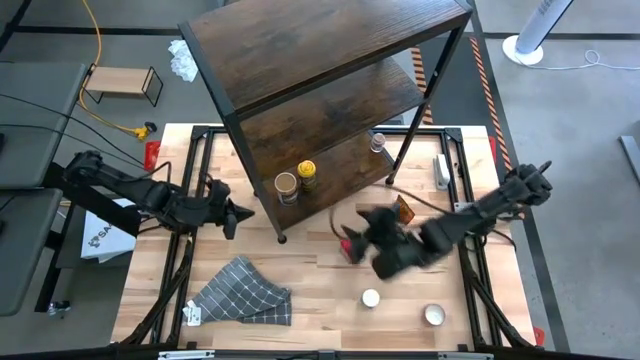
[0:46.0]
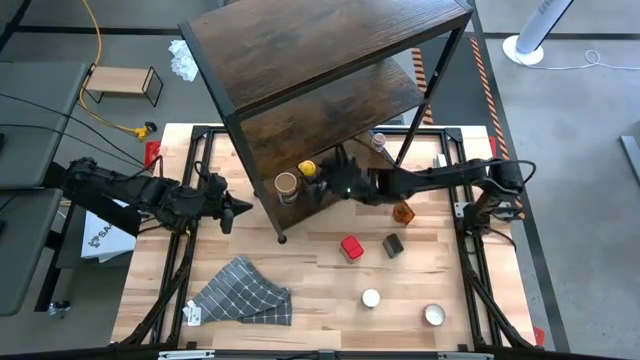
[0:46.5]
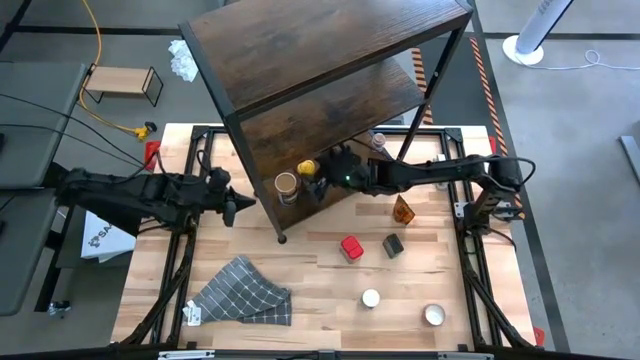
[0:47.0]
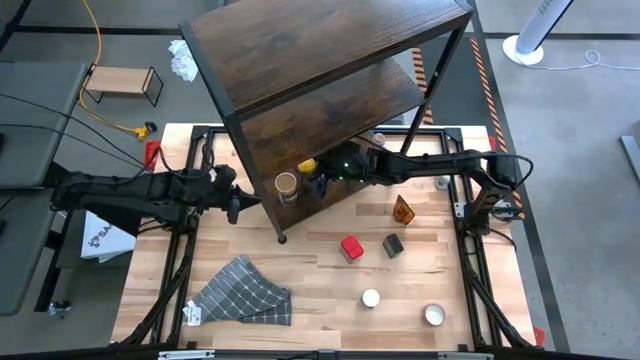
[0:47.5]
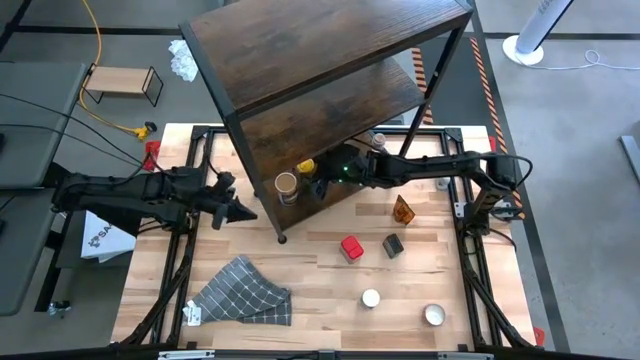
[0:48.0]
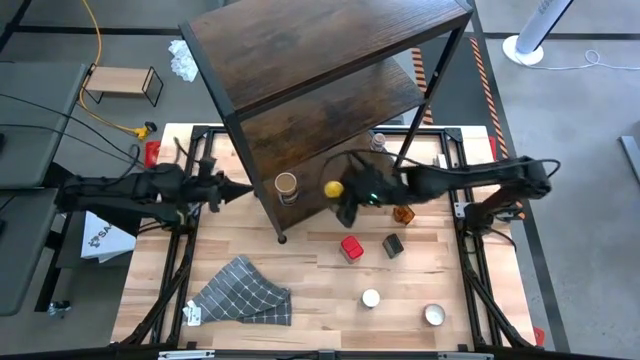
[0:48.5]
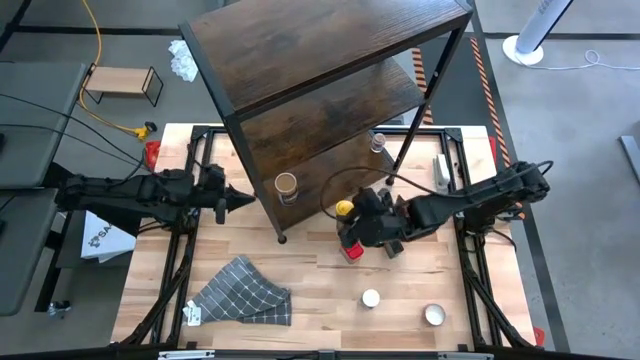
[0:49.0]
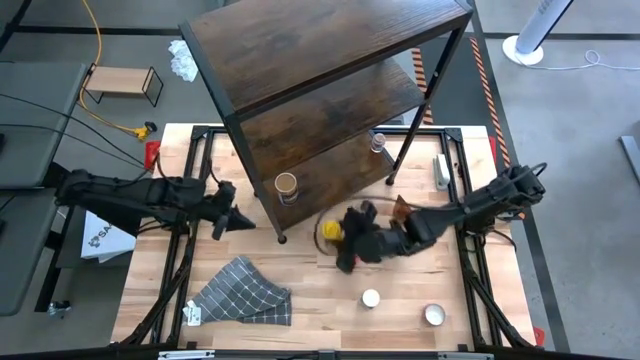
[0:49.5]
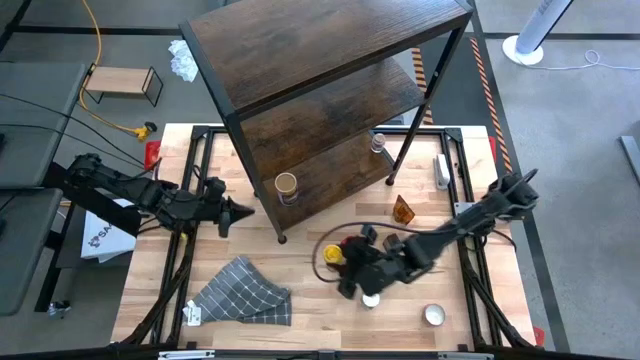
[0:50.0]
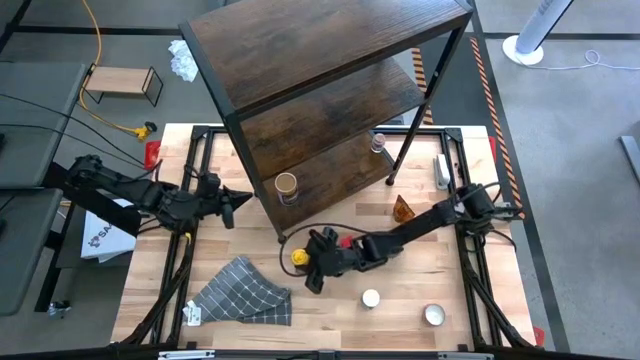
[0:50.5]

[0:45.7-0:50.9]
Task: Shelf spices
Remove the yellow seasoning bottle from the shelf

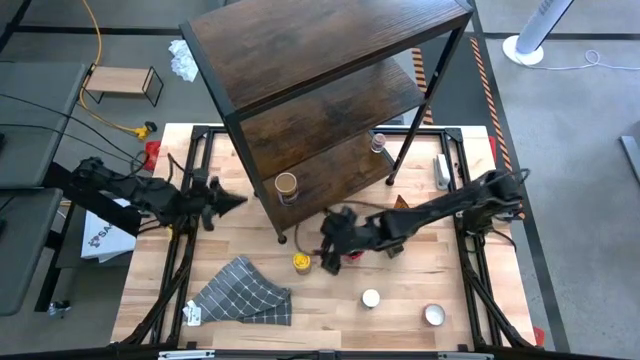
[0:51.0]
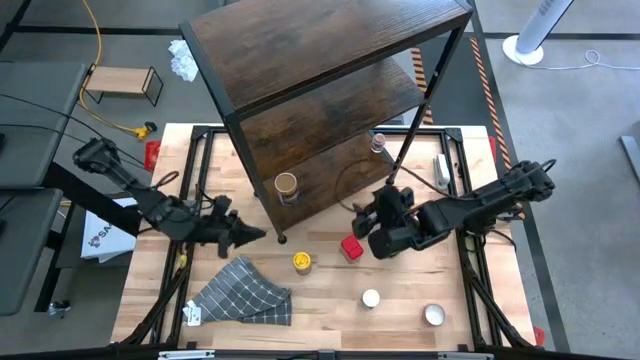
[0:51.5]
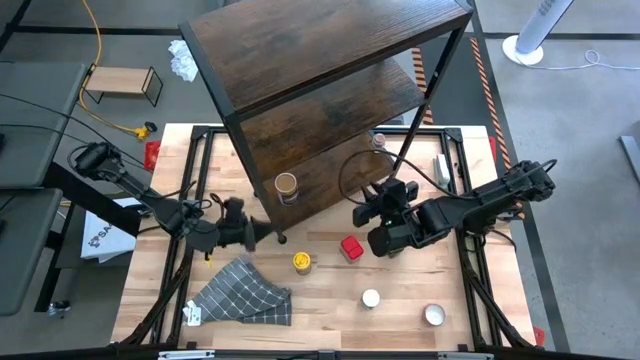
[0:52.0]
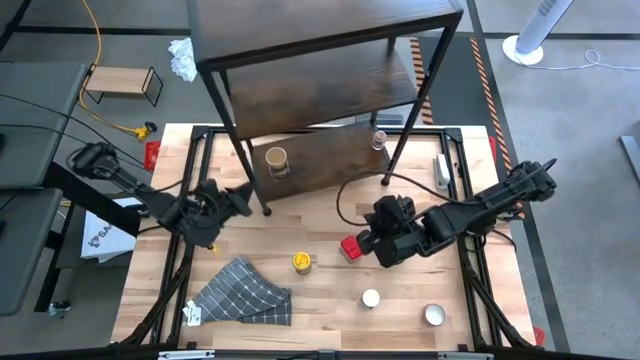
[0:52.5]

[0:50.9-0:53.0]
Adjust the shelf

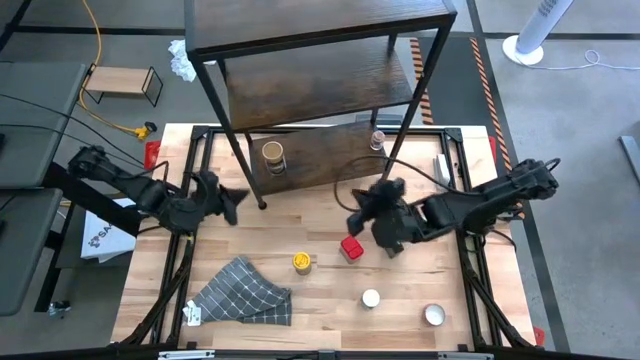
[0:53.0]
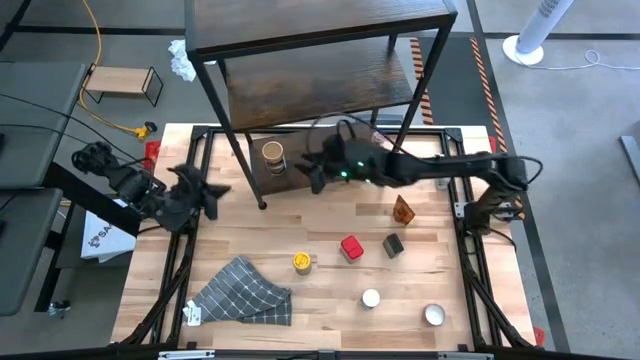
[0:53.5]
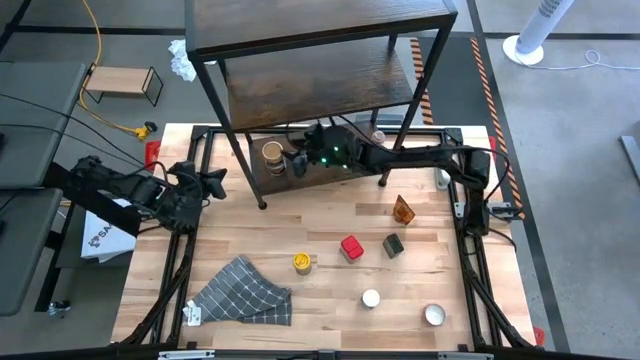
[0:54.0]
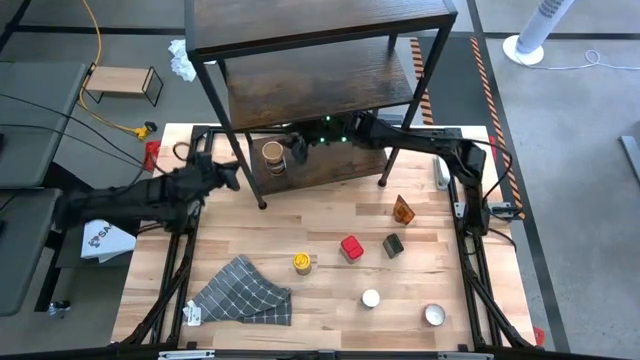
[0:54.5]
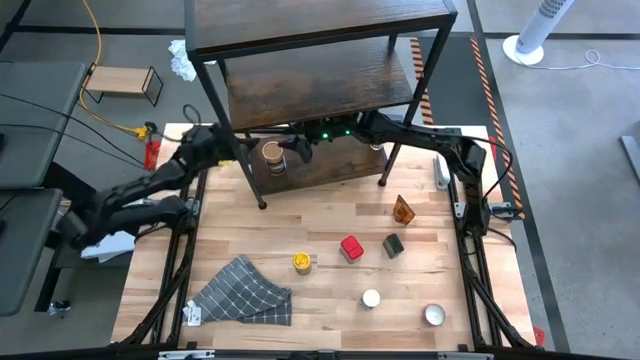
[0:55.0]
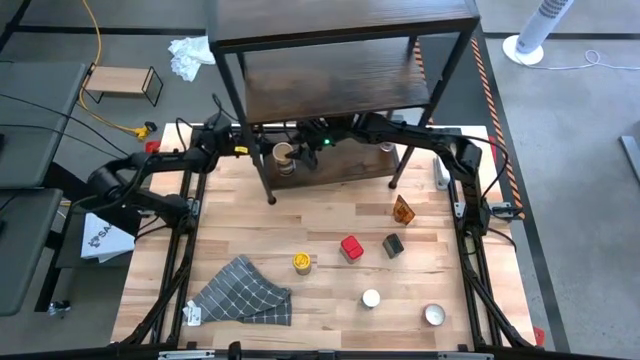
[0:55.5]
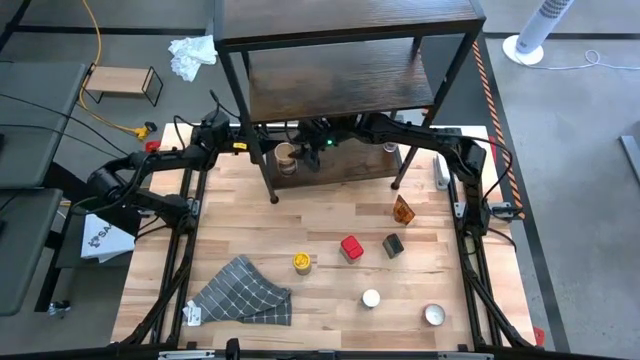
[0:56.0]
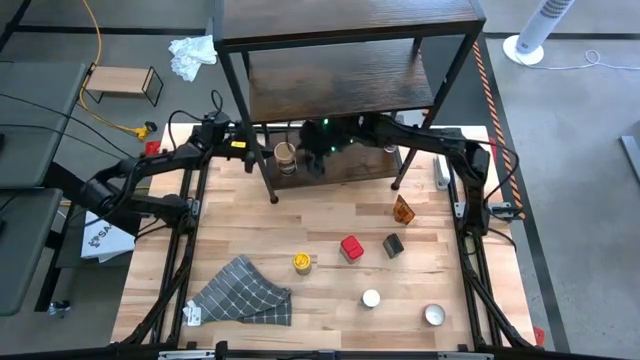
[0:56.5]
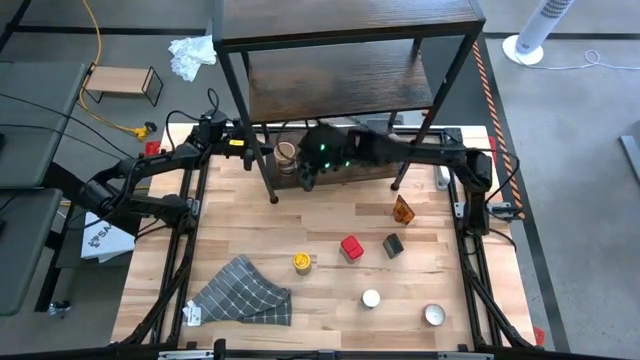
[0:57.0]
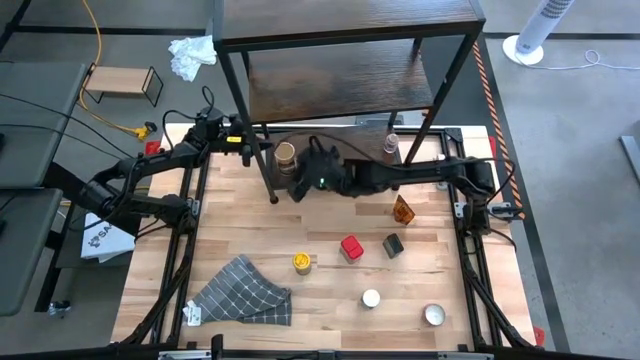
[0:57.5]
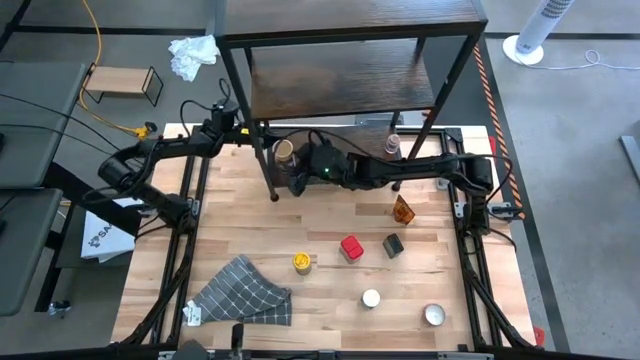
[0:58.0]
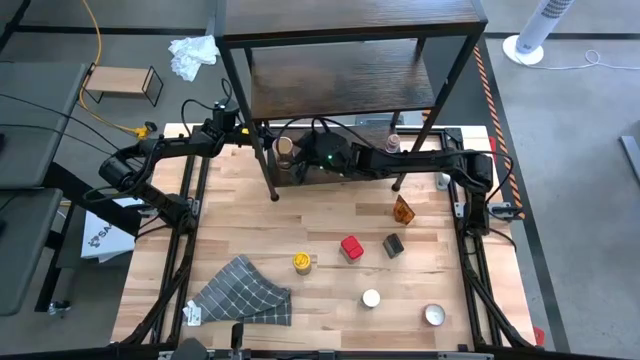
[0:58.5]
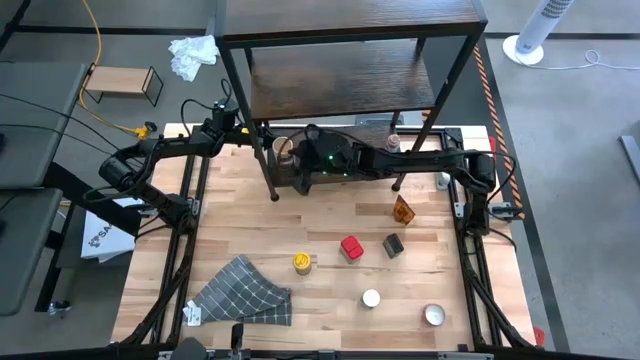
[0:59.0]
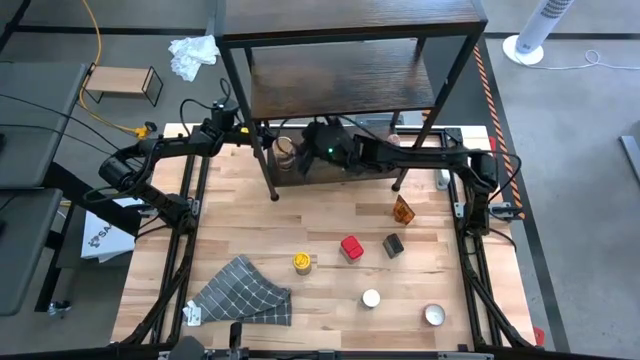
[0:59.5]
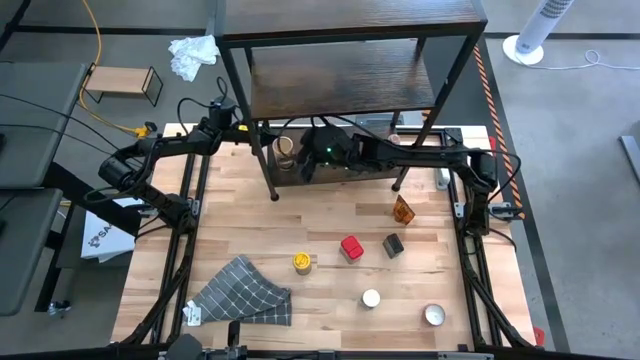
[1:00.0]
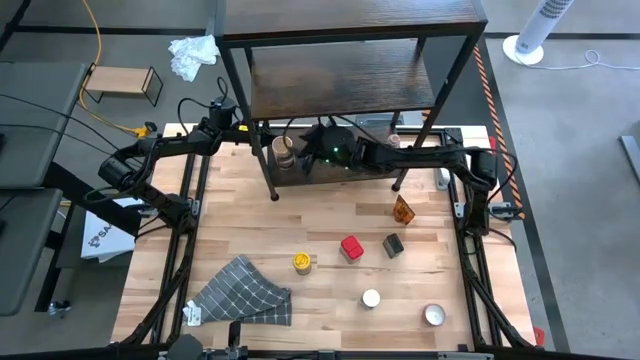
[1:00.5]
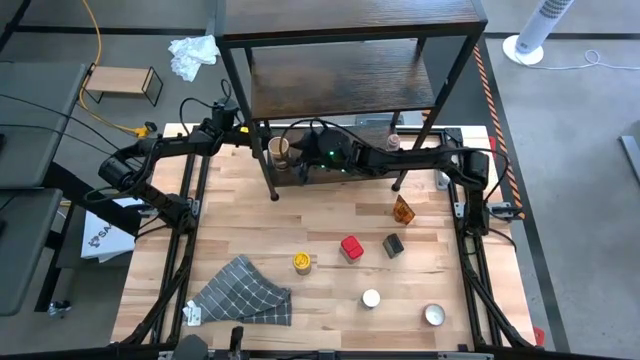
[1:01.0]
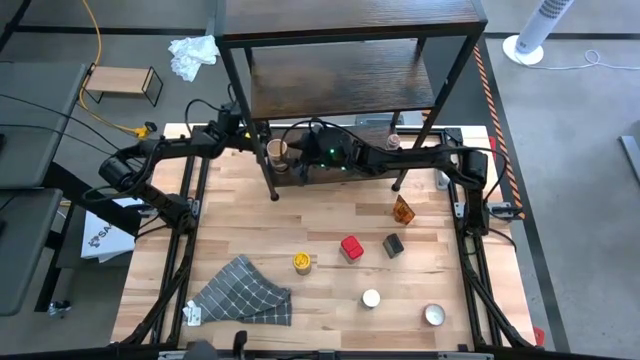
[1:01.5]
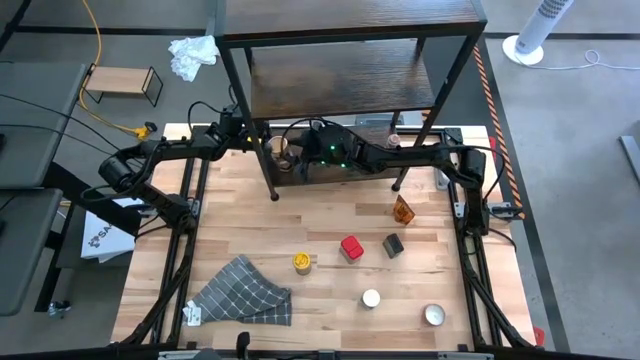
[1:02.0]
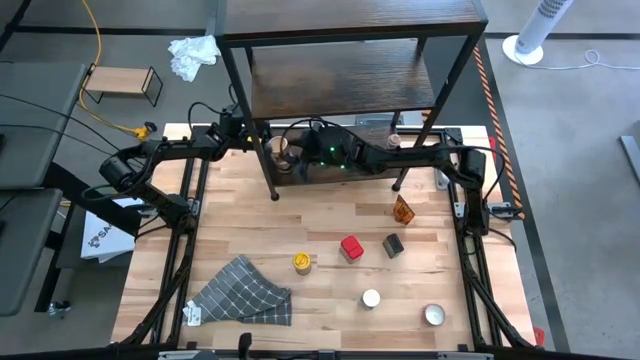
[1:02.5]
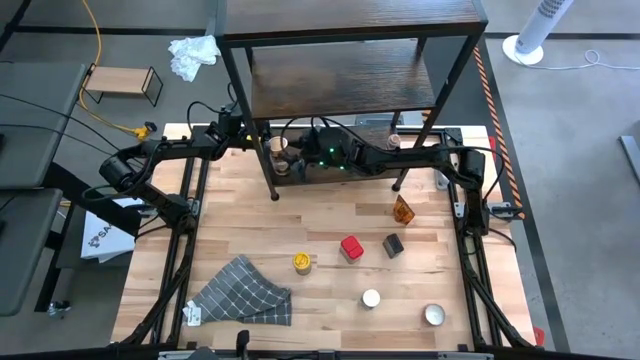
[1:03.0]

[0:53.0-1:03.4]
Remove the gold seasoning bottle from the shelf

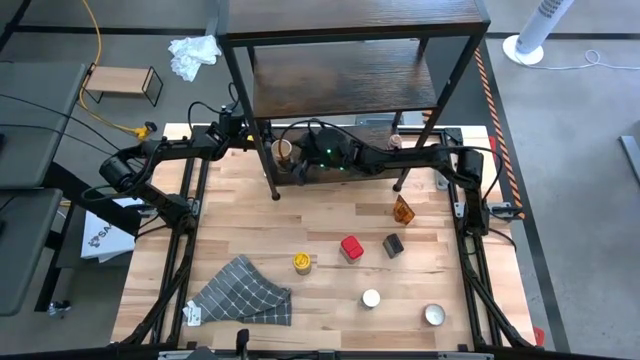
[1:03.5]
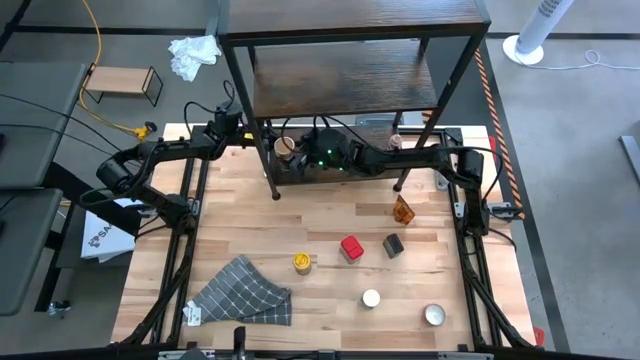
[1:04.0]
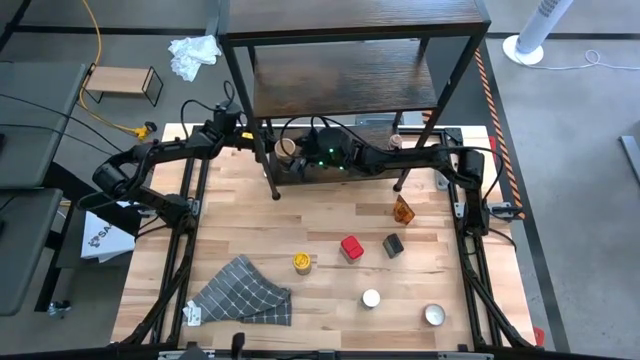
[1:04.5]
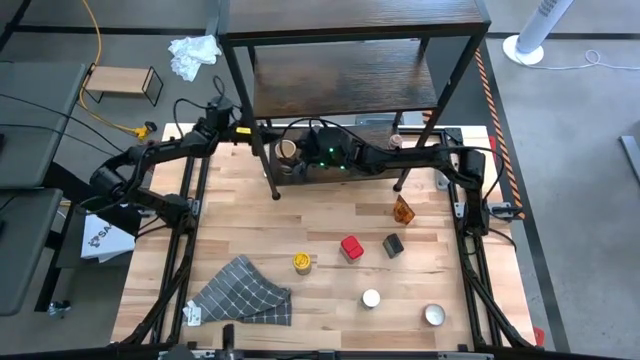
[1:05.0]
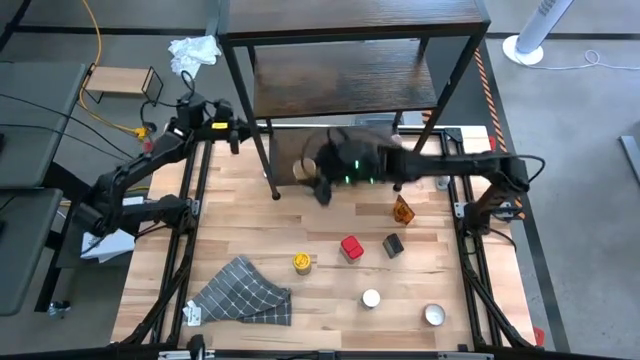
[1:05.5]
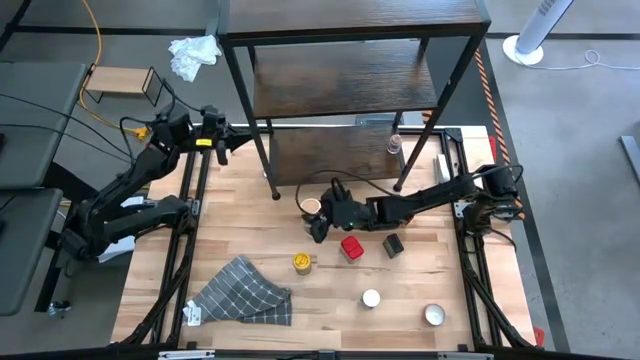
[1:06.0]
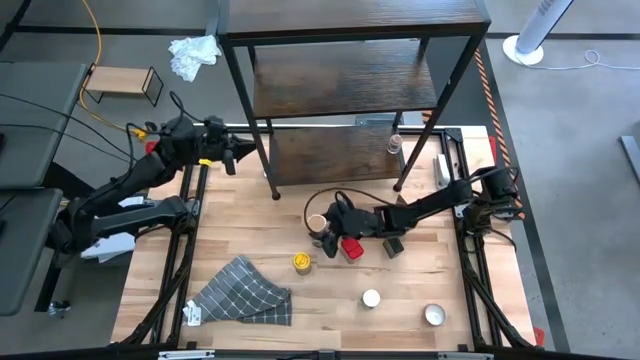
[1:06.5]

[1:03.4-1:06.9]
Remove the gold seasoning bottle from the shelf
